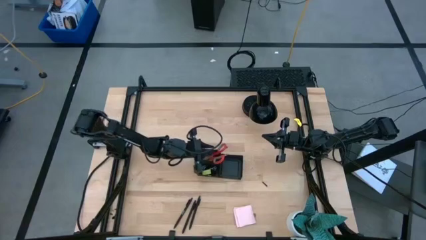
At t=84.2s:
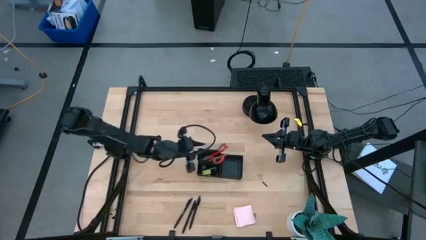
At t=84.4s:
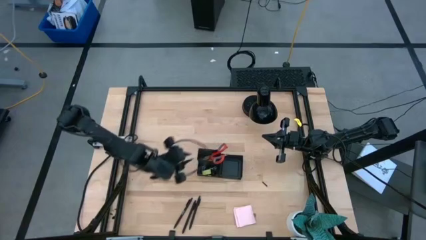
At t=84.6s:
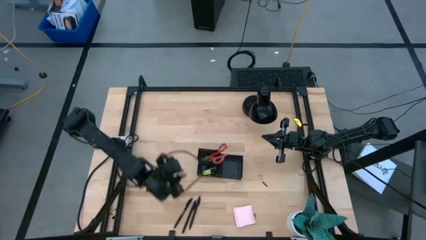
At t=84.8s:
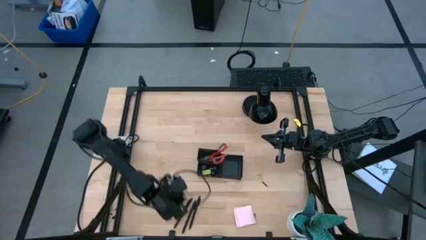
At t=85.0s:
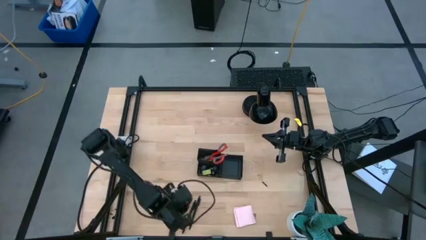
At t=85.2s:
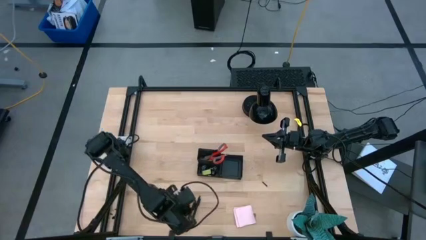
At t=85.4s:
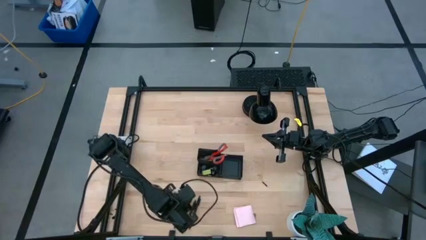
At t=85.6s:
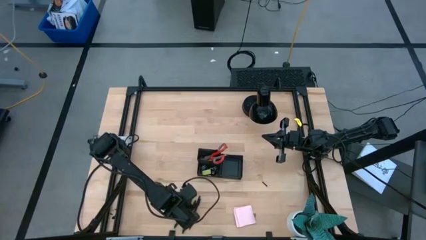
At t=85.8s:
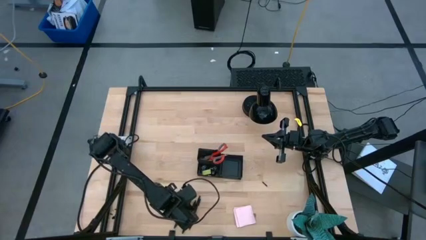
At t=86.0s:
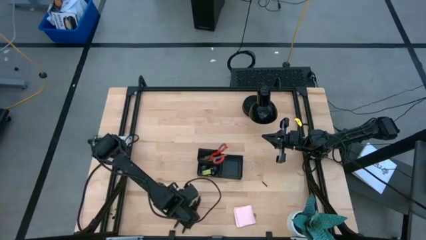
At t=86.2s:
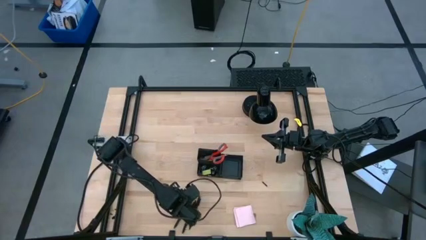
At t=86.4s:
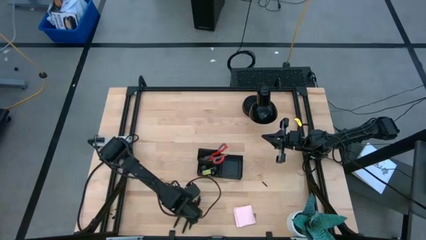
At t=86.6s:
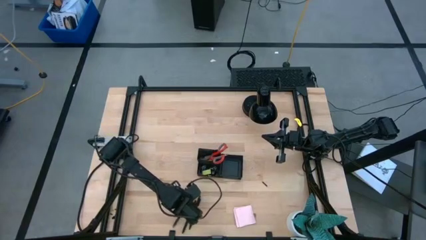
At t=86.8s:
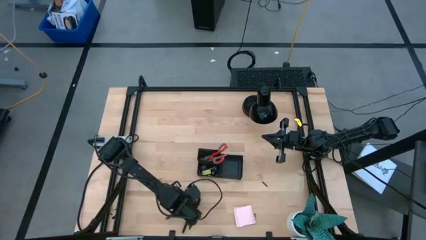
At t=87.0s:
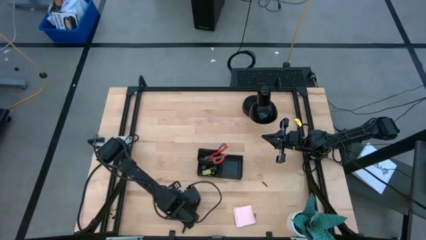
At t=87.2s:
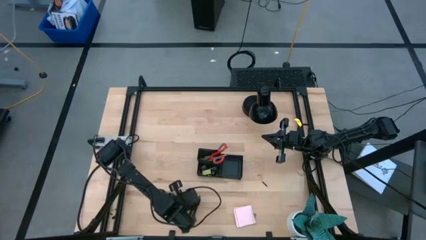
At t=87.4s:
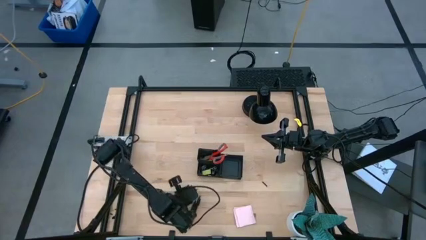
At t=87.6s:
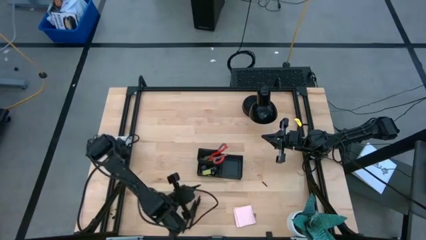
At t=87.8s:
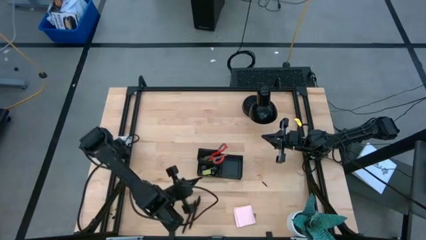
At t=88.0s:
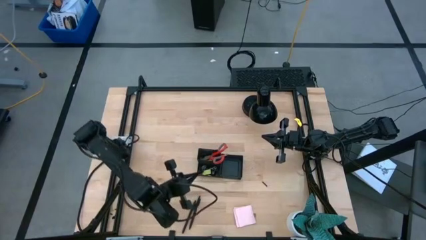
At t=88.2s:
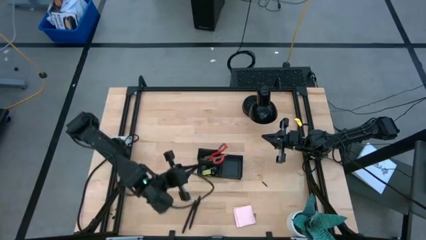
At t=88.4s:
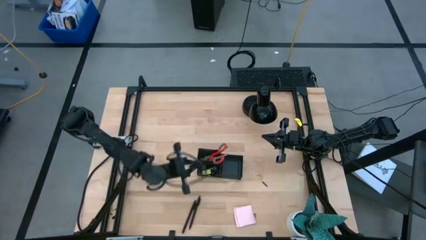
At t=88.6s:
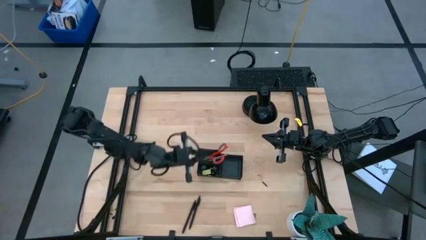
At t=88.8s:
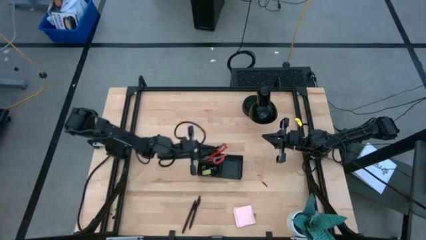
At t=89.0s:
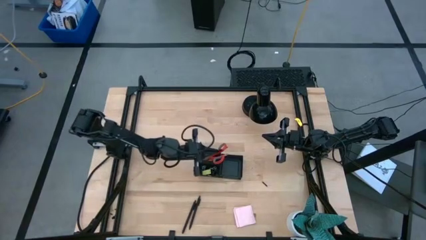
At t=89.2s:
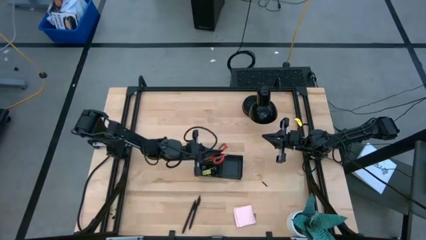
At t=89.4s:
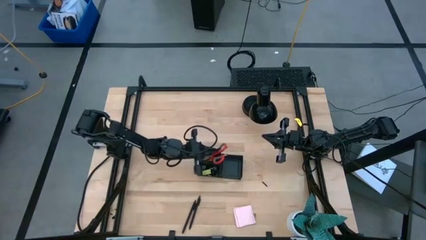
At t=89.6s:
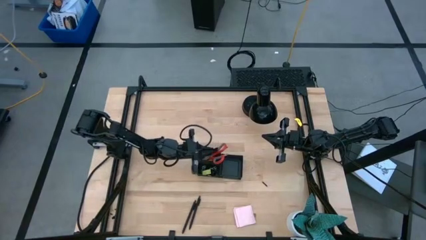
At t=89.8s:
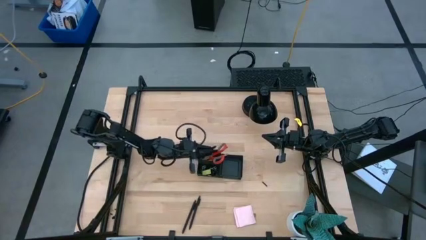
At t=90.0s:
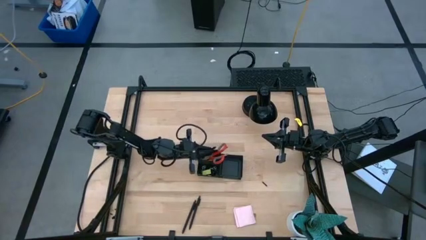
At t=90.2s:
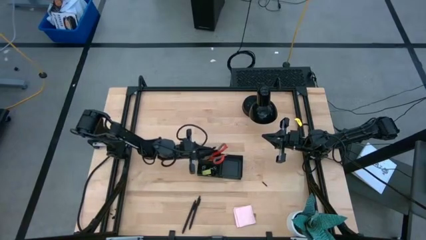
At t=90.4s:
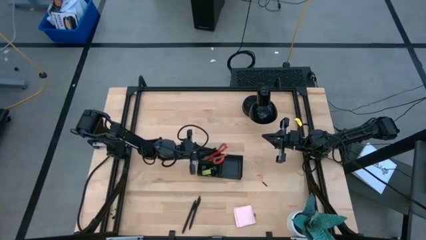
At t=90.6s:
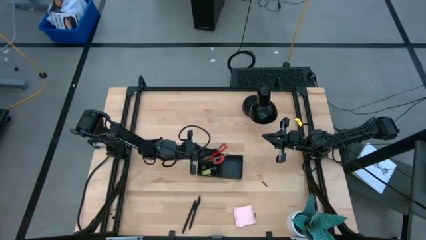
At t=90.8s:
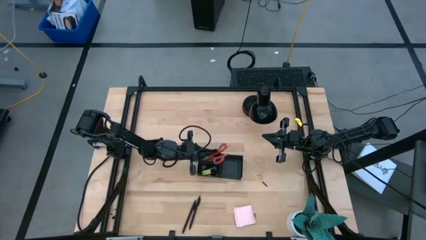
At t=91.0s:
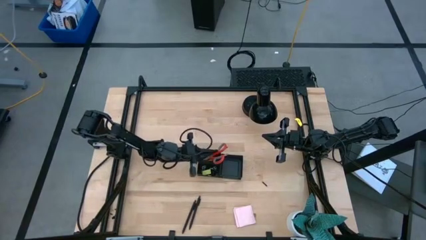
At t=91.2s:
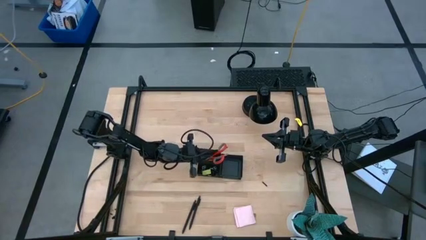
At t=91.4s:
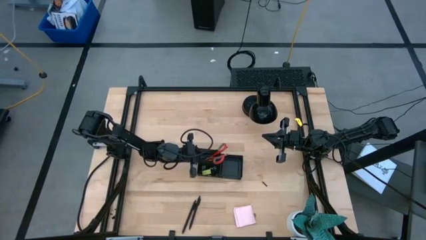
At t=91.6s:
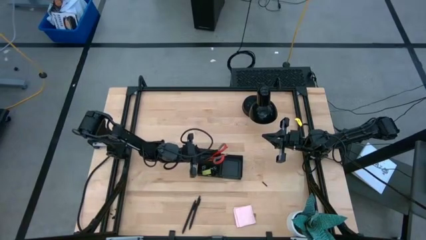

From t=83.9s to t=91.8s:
Task: Pick and place office supplies into organizer
Put the black pen into the black desk organizer

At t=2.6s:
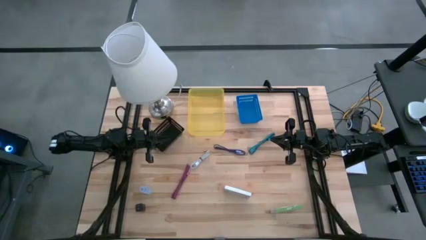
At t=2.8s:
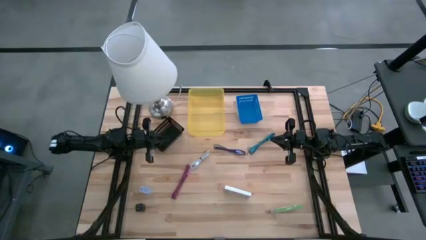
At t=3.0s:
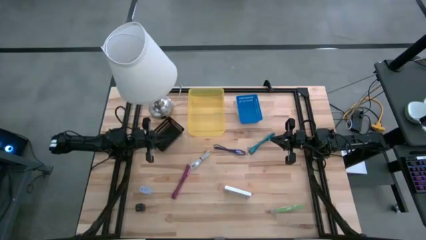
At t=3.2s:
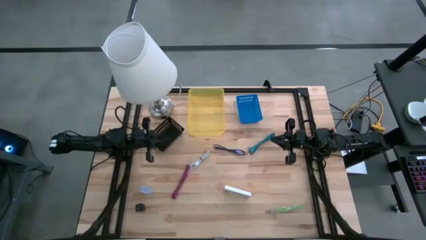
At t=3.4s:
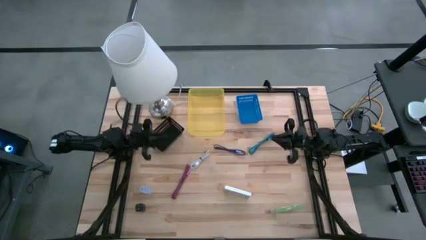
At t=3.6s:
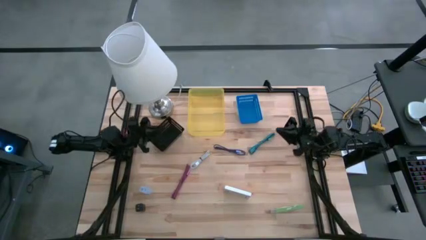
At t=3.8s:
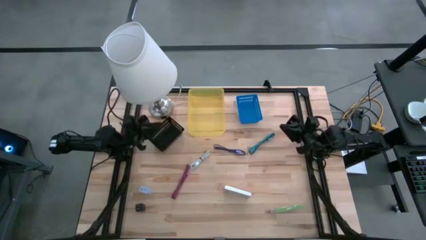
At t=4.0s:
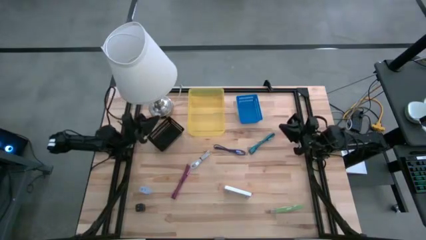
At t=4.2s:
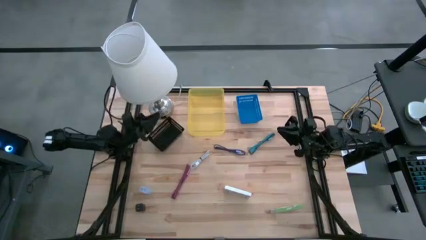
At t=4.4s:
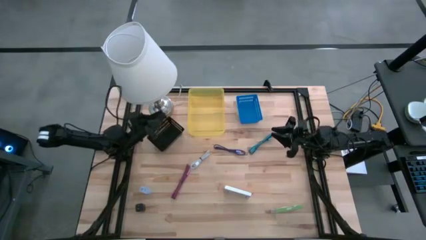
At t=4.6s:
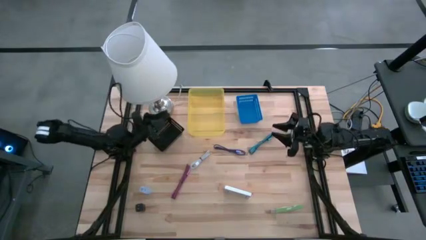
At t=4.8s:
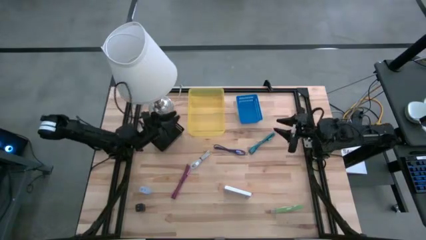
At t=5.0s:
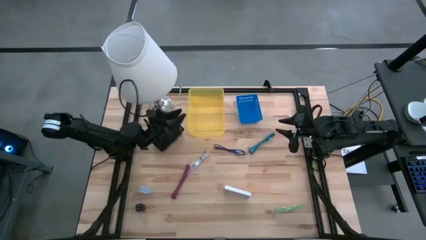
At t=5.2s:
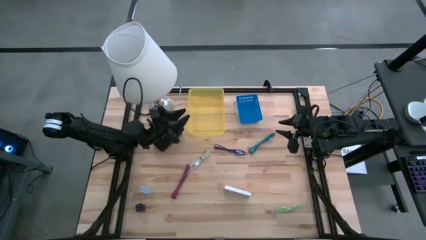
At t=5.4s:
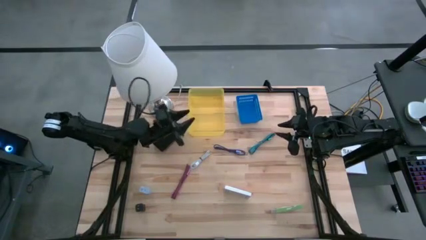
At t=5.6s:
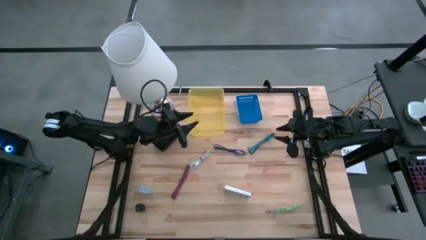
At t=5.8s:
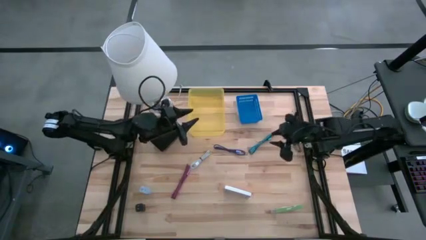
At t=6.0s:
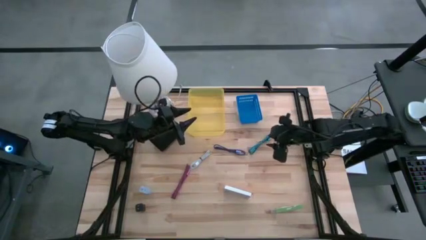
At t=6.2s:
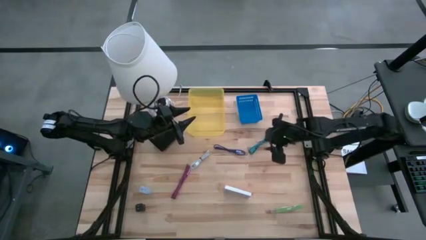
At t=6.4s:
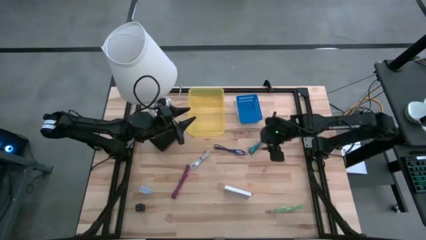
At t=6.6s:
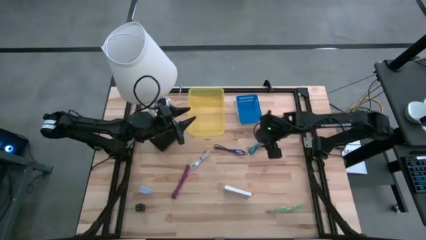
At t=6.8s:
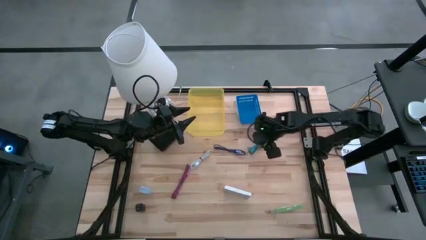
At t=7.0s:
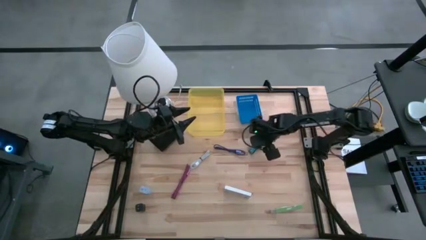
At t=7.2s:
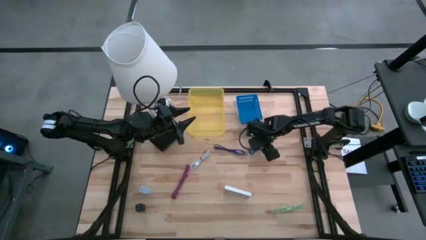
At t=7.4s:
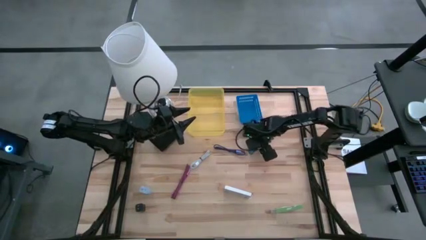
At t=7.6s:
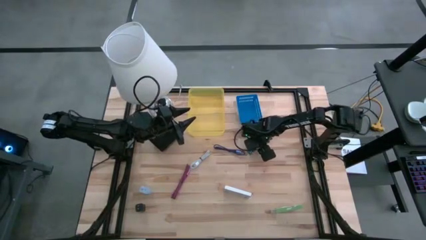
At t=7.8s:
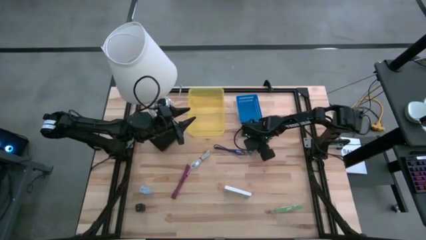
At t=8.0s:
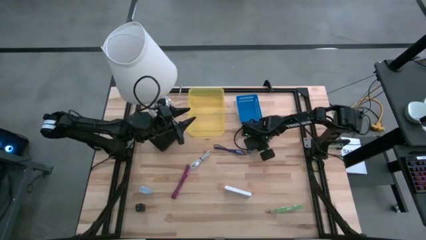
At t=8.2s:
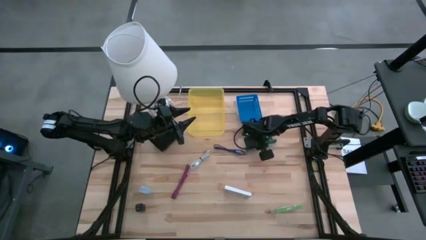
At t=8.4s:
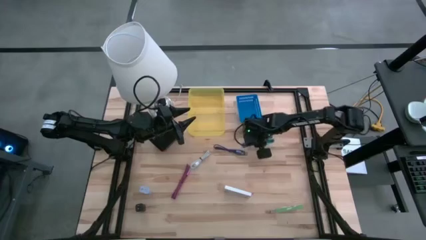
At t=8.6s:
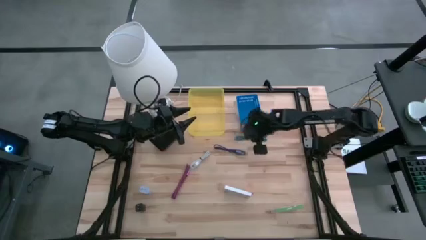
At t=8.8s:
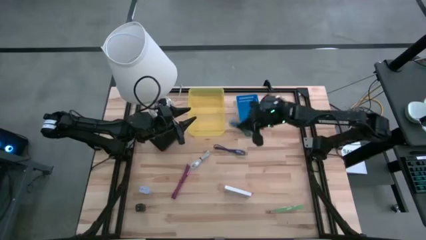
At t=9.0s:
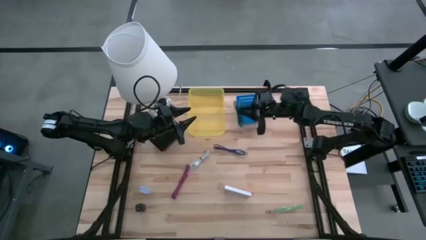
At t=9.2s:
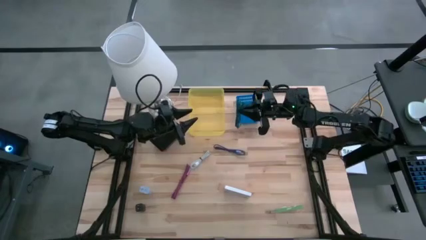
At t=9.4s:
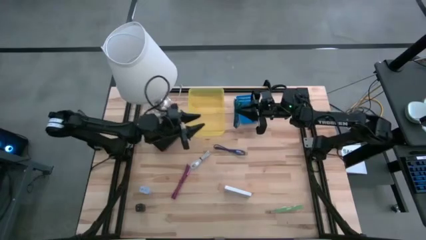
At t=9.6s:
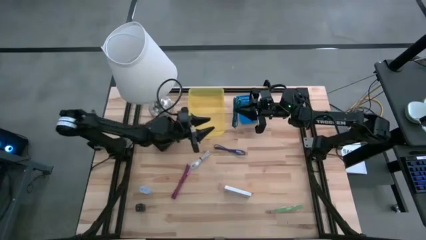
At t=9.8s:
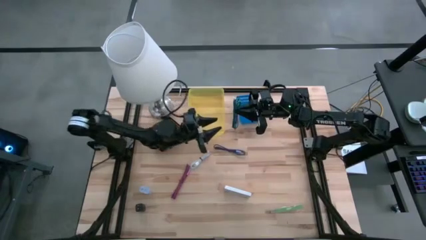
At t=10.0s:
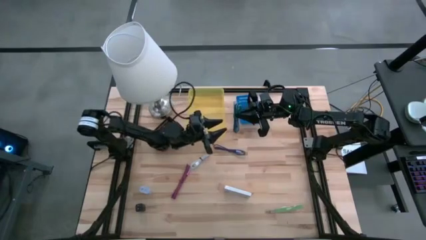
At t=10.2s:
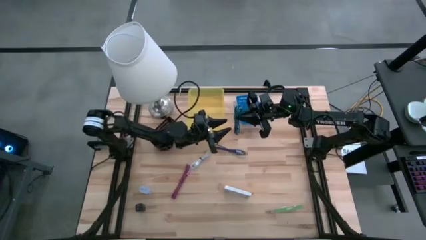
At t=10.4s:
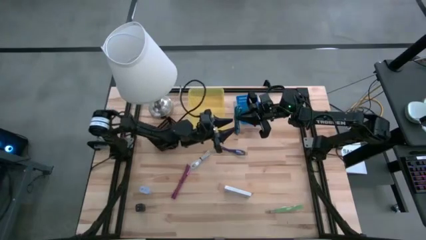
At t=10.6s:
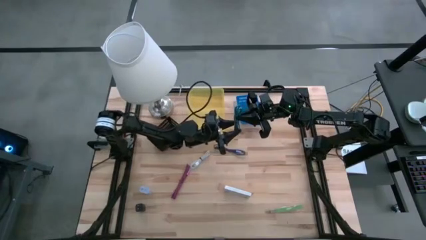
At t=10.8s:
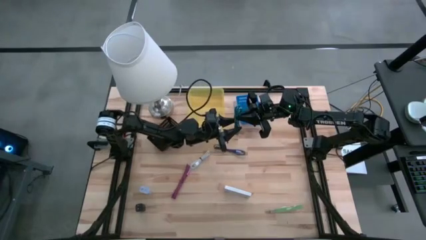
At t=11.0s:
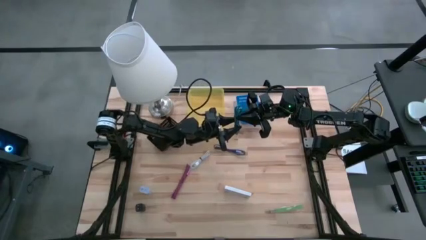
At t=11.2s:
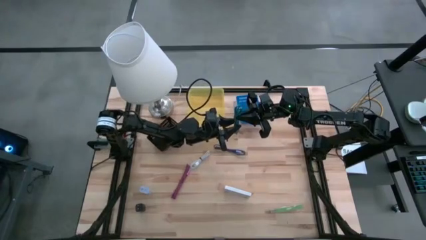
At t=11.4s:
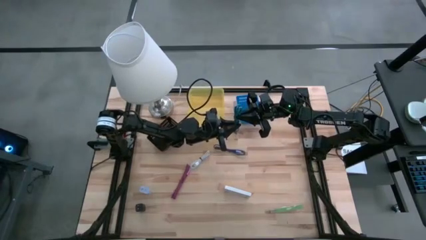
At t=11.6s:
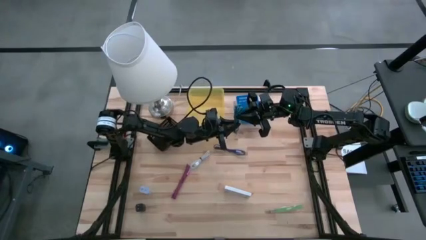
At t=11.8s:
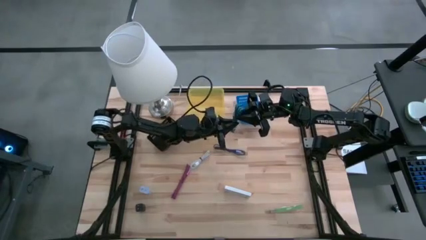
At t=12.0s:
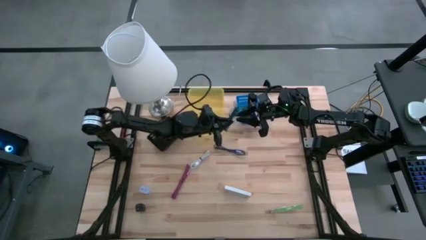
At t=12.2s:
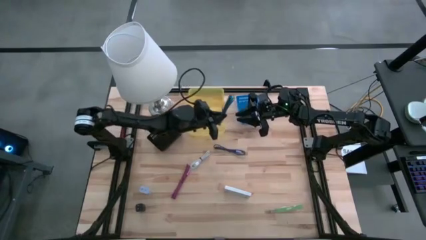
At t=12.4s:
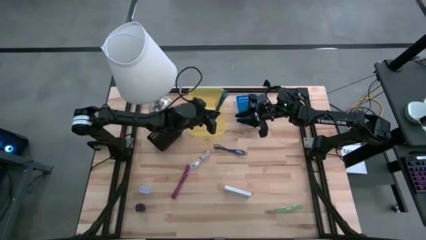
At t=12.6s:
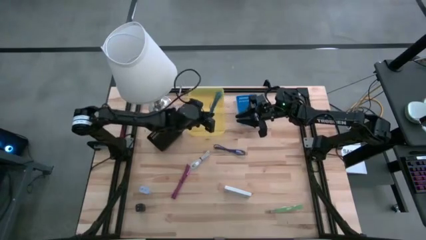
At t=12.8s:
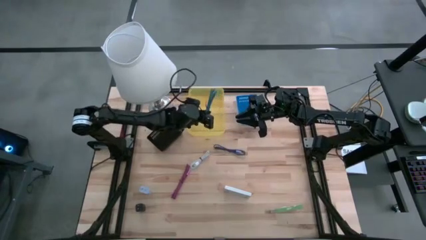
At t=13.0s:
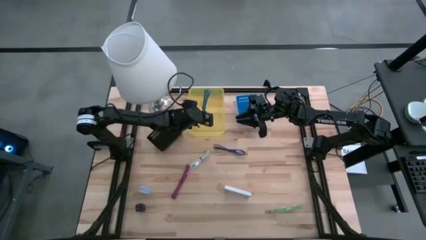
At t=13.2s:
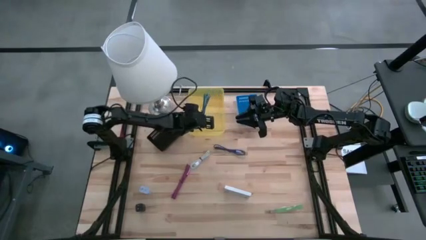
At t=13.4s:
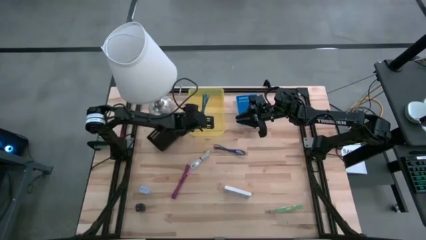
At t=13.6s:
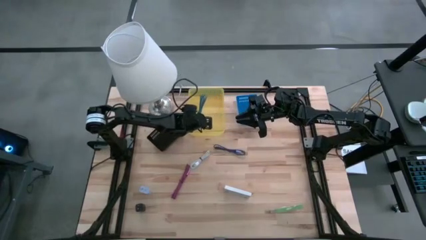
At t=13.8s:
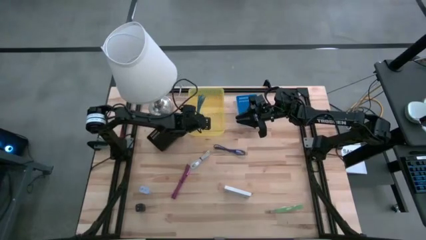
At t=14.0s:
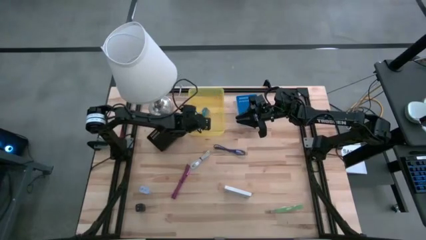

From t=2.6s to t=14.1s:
Task: Pick and place items into bin
Put the blue charger cable into the yellow bin
